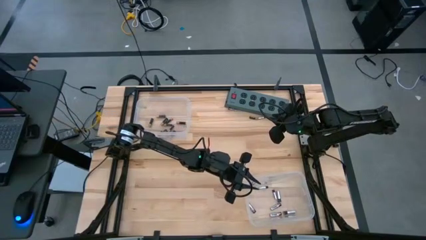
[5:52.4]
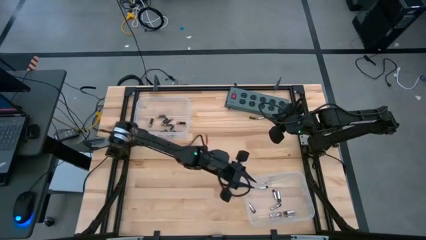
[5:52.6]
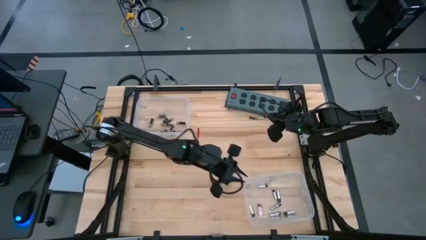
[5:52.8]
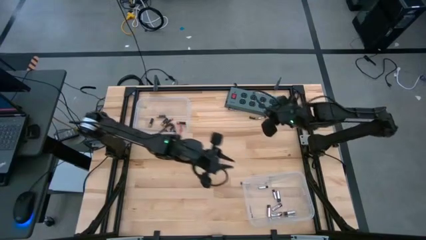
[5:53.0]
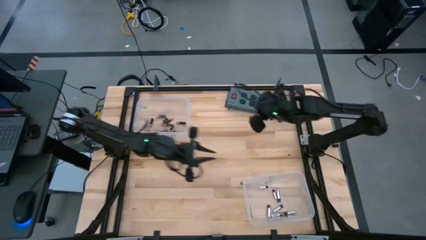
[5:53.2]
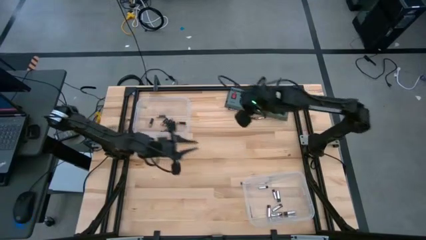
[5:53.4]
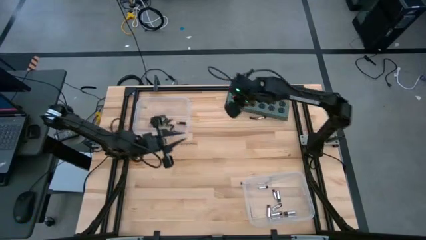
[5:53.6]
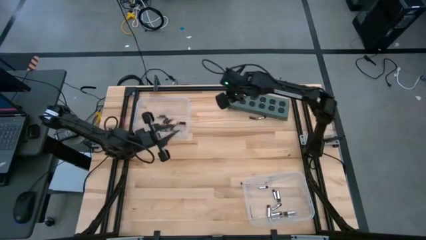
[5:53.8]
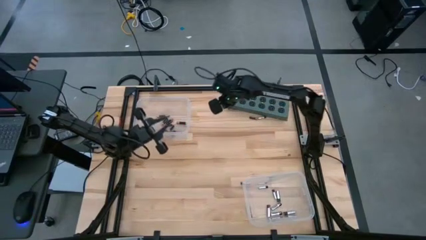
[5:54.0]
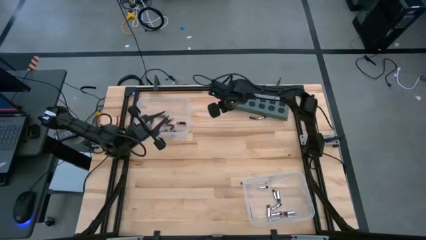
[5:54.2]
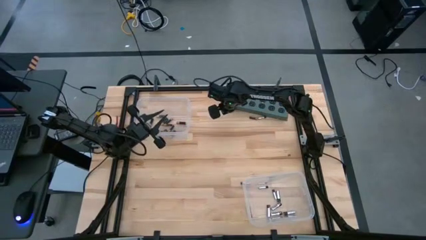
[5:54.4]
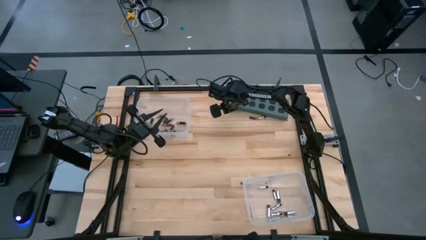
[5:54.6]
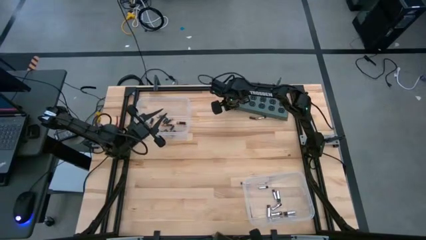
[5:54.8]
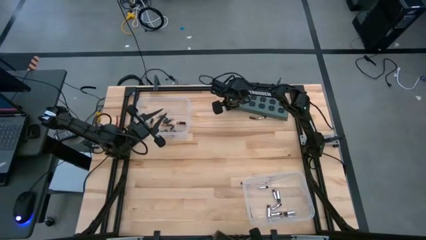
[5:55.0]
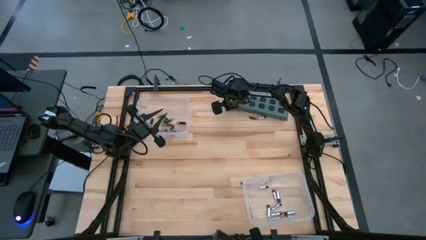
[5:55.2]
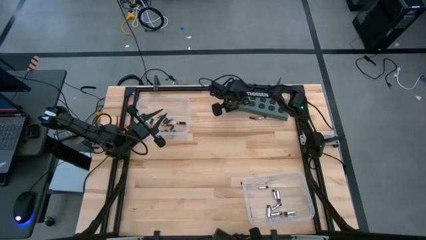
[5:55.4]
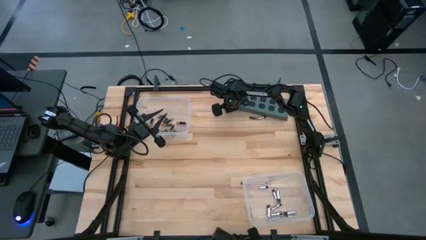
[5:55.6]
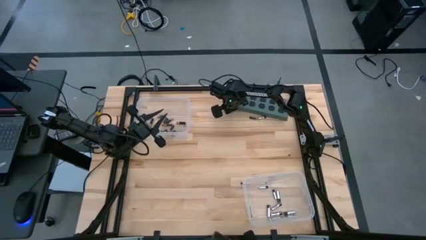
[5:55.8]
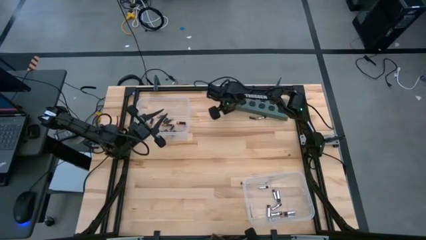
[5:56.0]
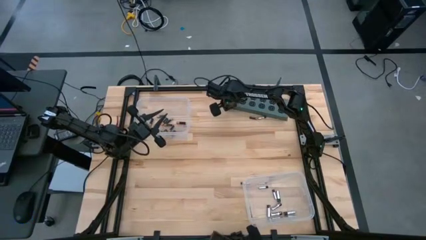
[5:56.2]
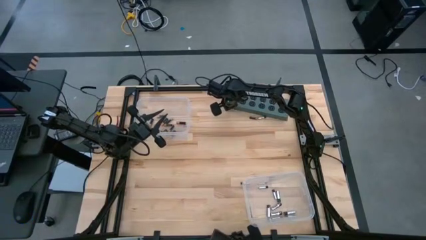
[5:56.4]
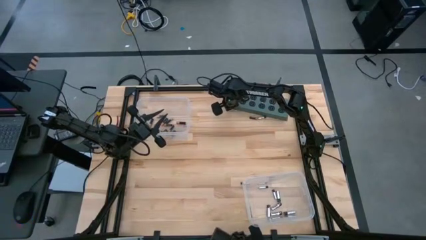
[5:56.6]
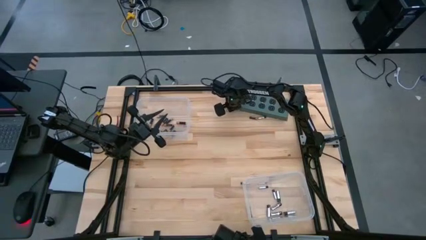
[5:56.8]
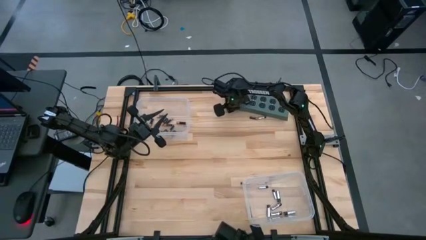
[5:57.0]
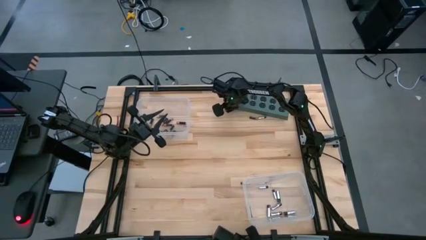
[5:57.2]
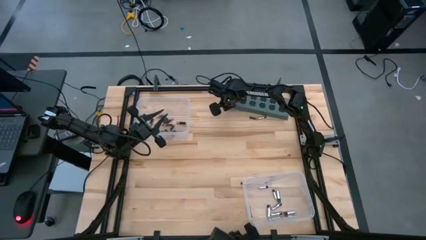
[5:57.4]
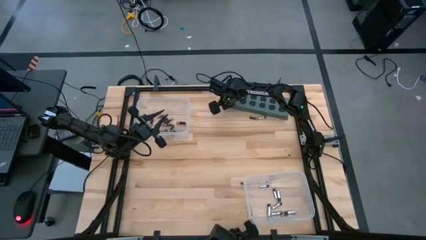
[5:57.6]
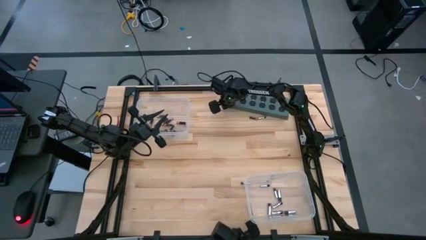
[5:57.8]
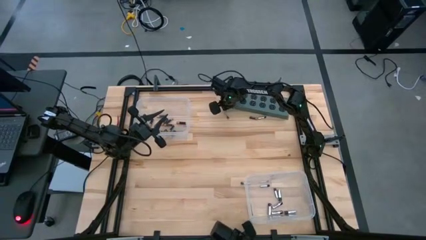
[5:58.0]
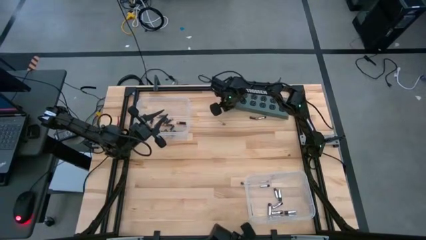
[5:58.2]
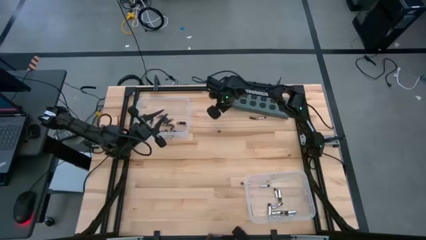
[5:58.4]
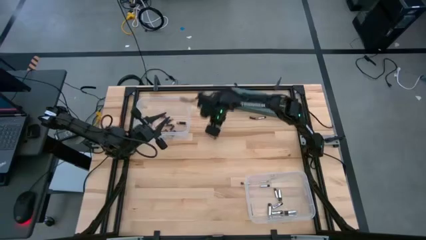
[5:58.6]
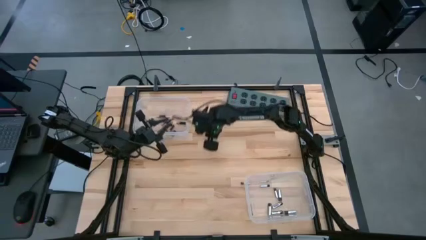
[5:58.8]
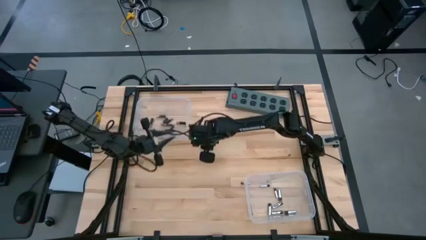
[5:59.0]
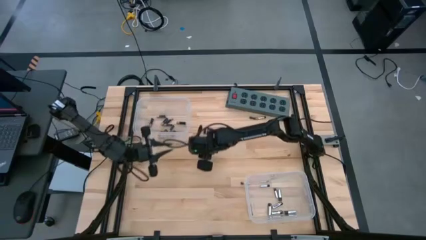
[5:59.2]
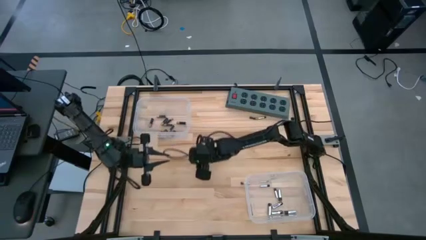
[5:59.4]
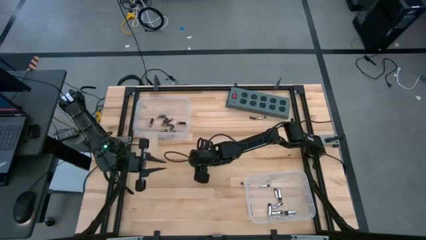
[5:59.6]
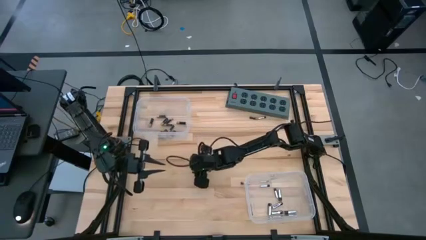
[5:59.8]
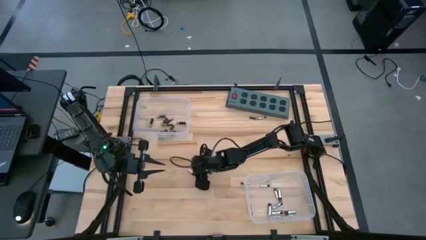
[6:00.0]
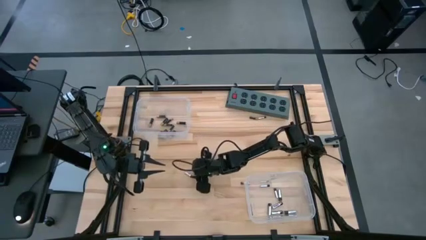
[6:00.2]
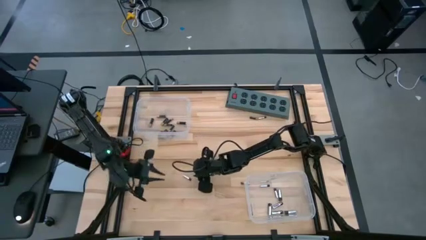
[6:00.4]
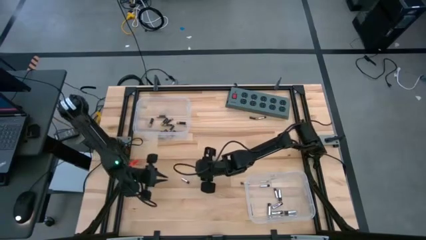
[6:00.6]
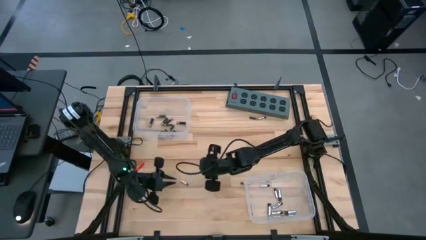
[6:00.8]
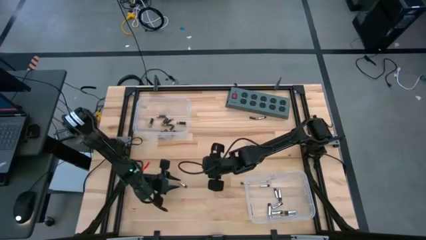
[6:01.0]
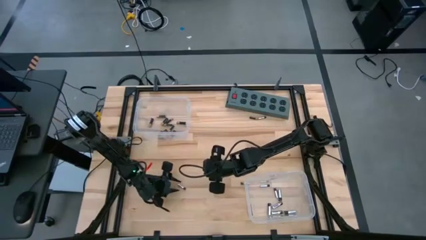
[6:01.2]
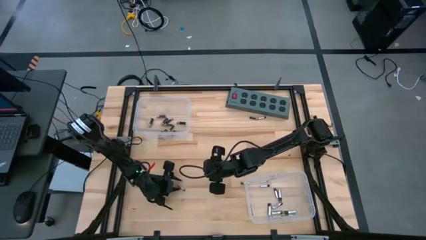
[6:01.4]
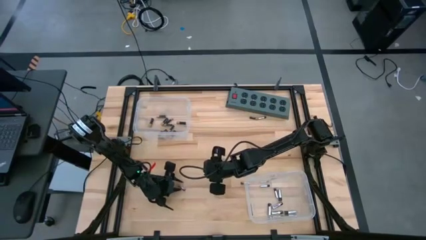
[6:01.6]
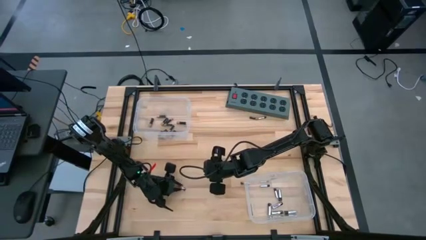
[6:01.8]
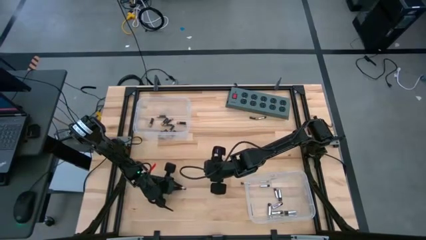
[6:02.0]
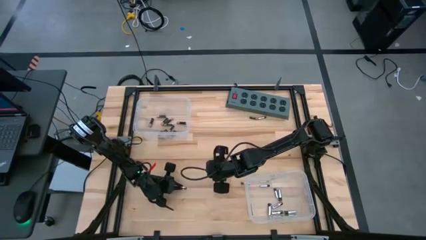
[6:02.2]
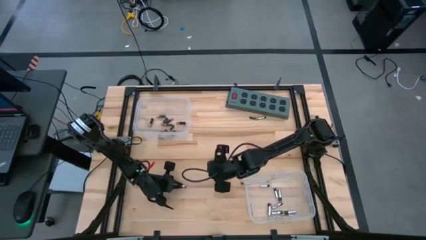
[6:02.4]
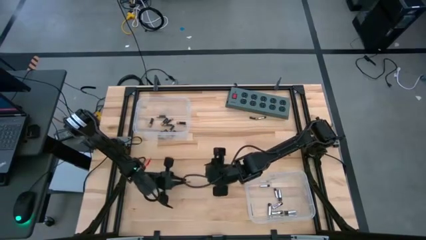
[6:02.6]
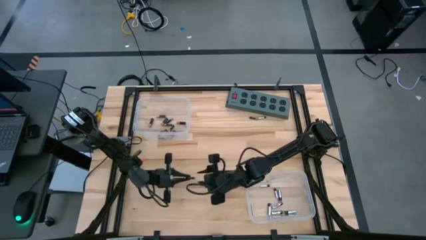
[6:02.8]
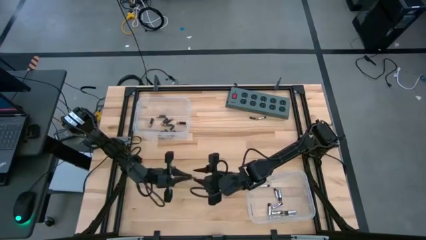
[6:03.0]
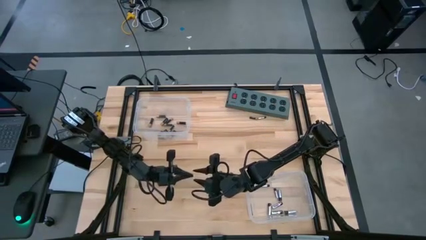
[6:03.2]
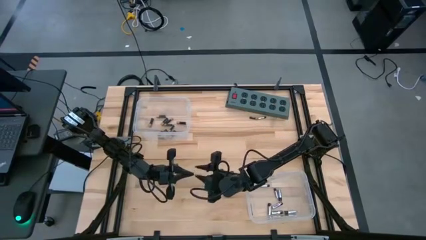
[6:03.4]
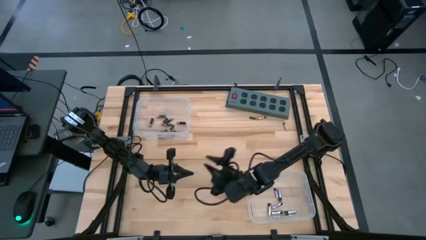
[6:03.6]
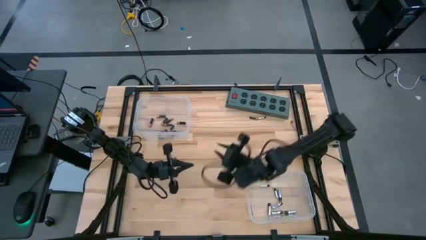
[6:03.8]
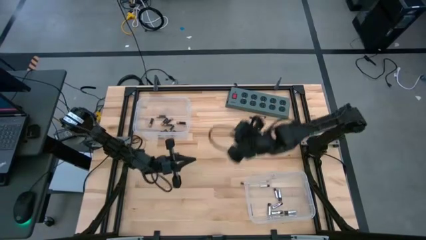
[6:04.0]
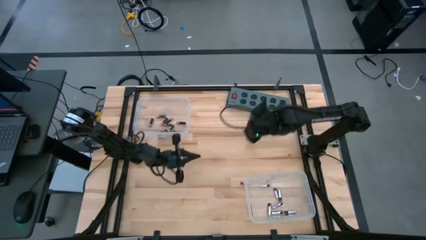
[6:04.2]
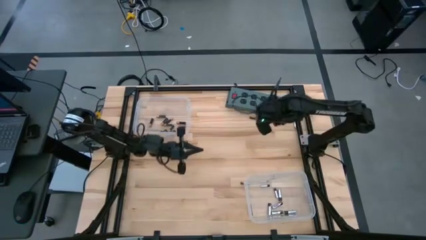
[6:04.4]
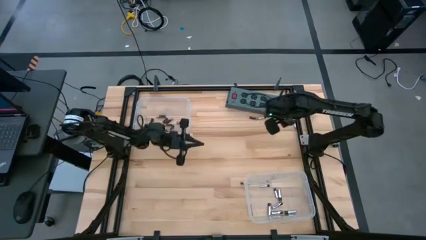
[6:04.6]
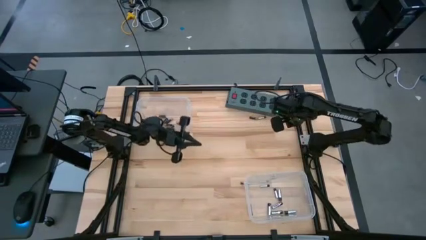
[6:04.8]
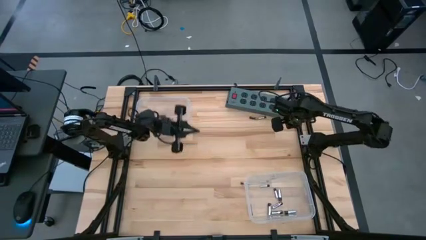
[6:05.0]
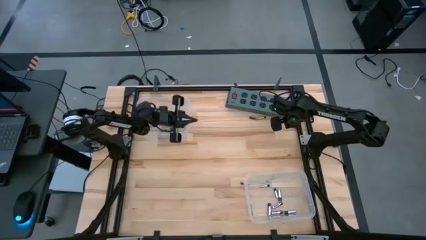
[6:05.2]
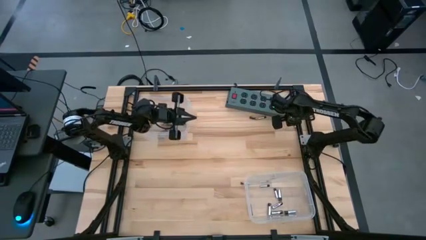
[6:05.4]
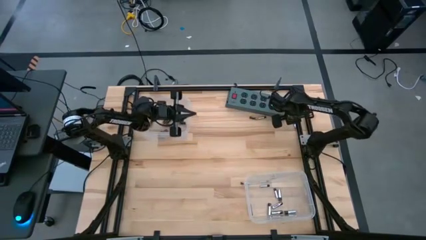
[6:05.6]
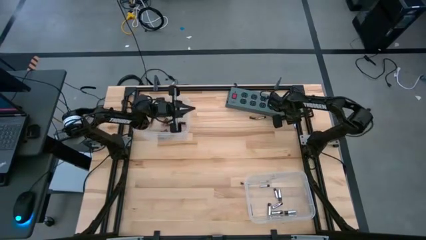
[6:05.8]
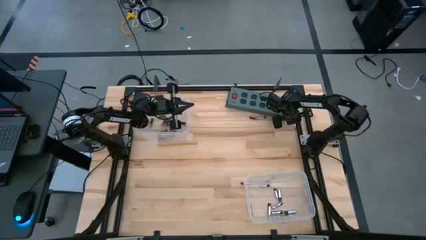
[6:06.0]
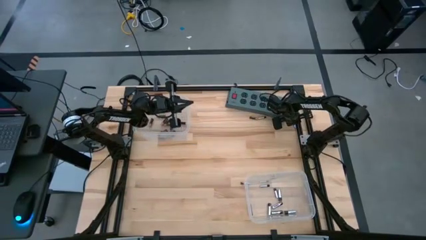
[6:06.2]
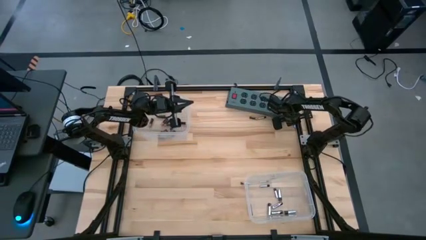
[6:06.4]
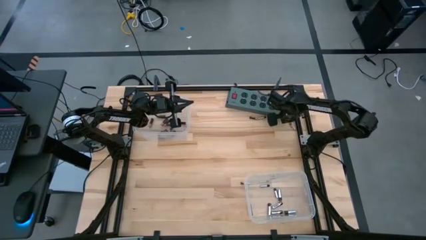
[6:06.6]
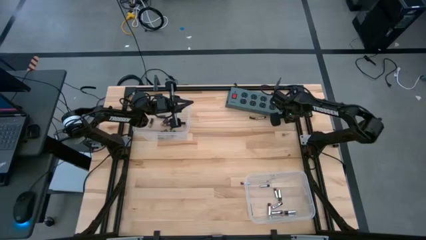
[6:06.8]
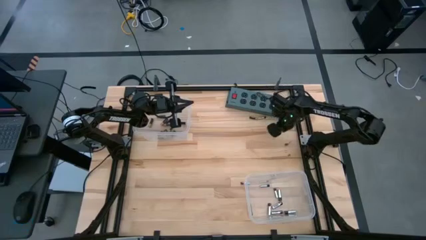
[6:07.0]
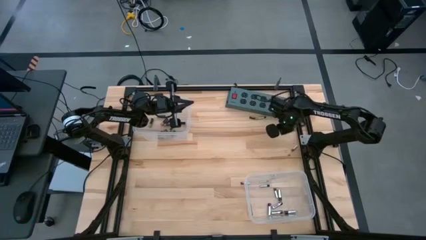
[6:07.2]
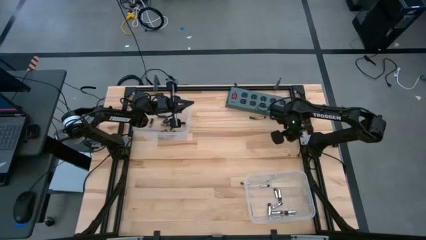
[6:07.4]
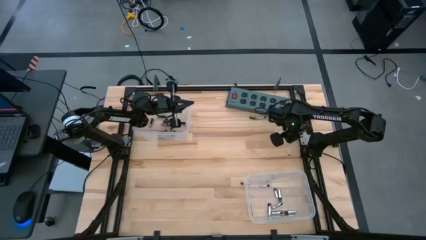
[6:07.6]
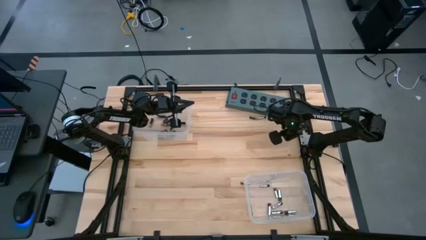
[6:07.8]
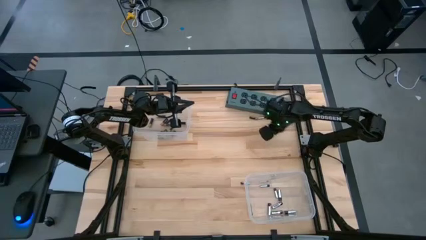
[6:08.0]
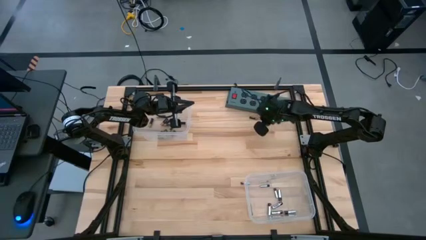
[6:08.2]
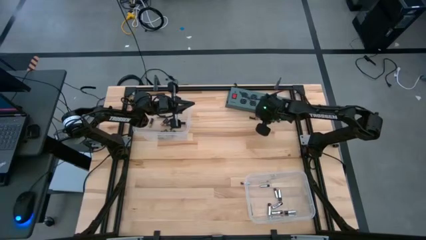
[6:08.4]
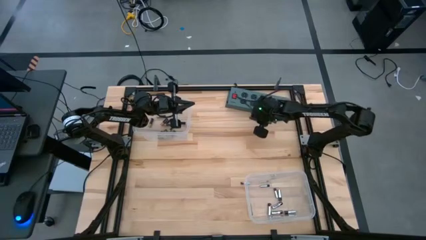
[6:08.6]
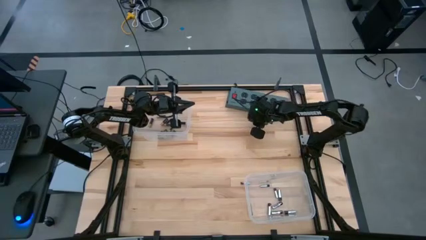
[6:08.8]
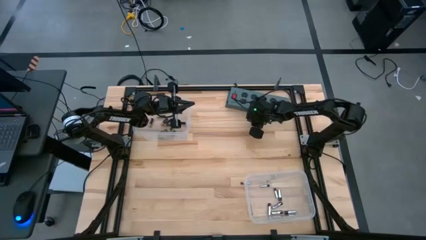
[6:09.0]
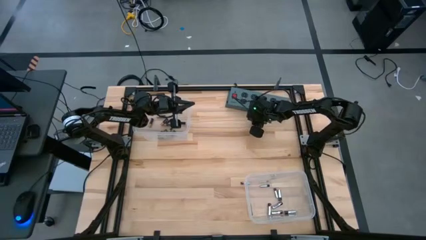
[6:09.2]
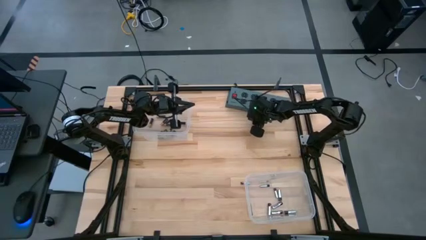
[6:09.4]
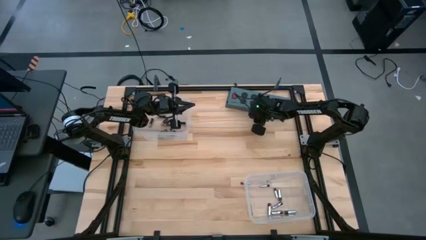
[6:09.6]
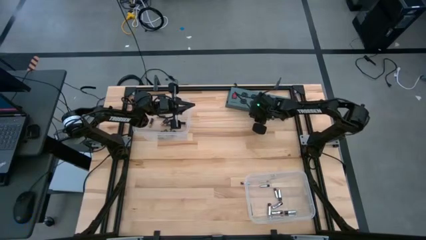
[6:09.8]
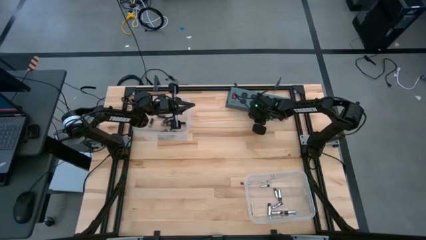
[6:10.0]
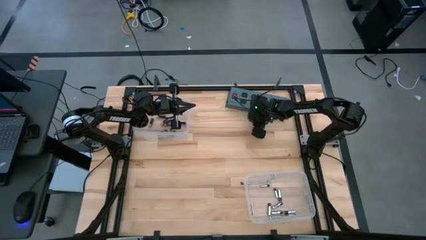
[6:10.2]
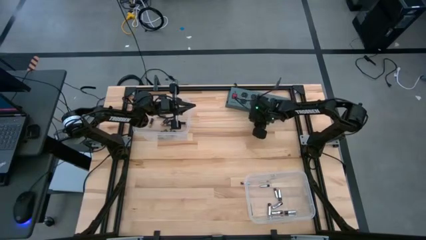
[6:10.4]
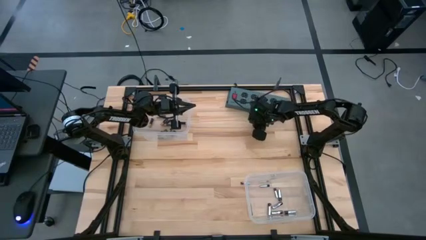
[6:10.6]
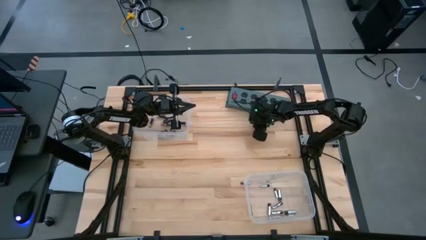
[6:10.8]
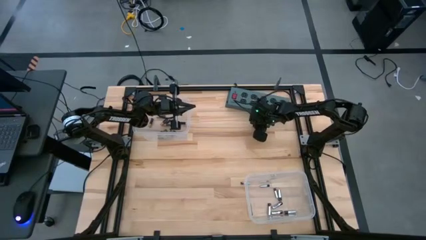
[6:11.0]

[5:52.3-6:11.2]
Task: Sort batteries
Put the silver battery into the bottom transparent bin
